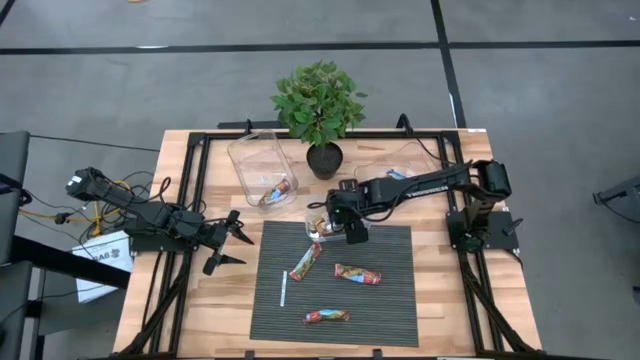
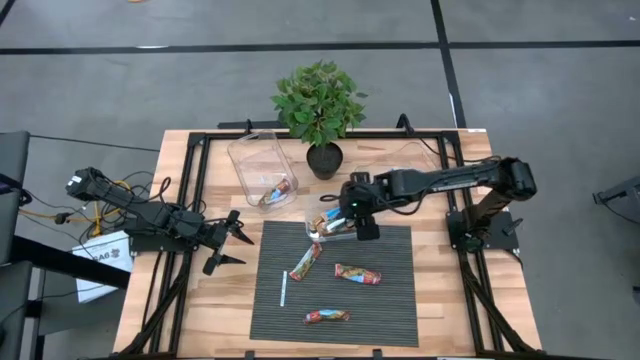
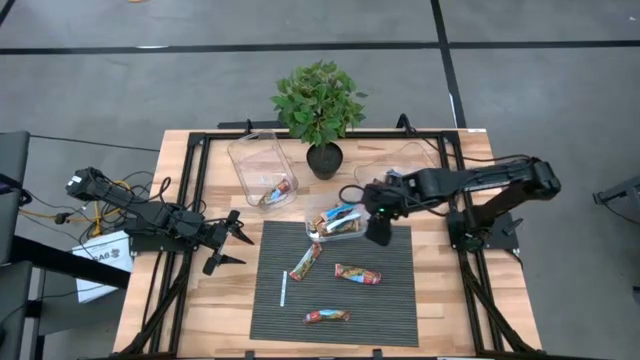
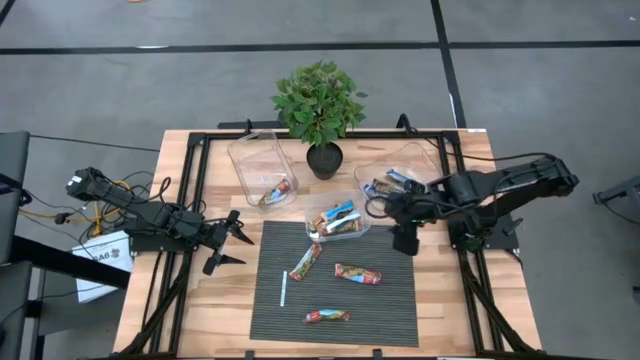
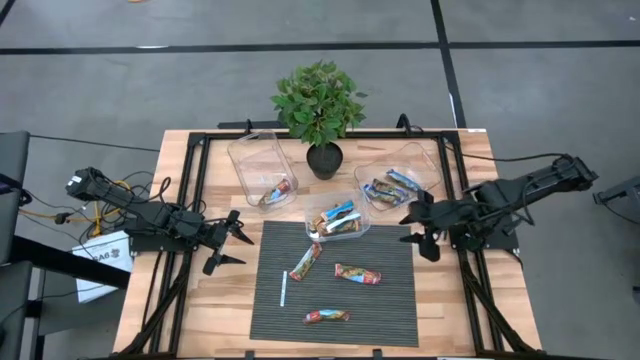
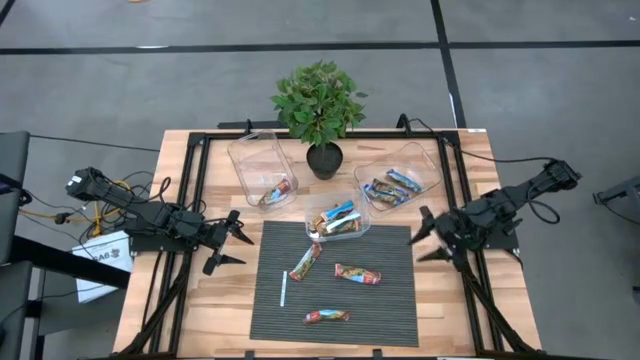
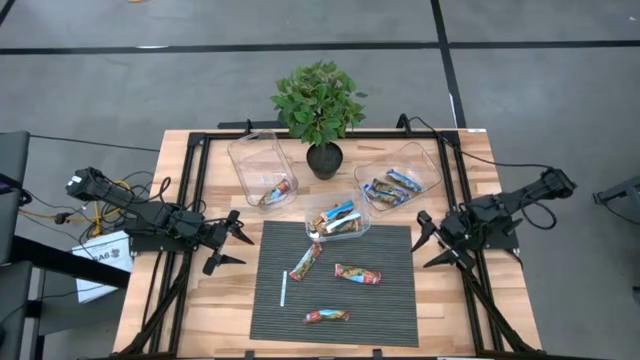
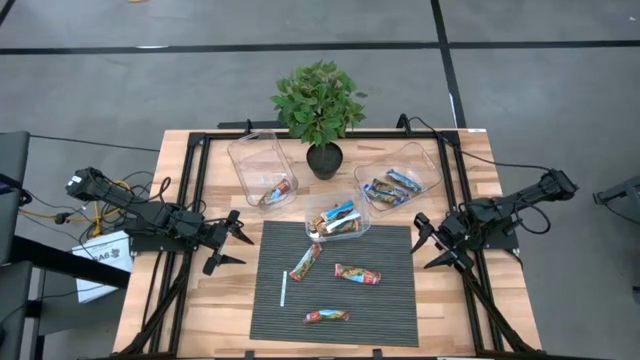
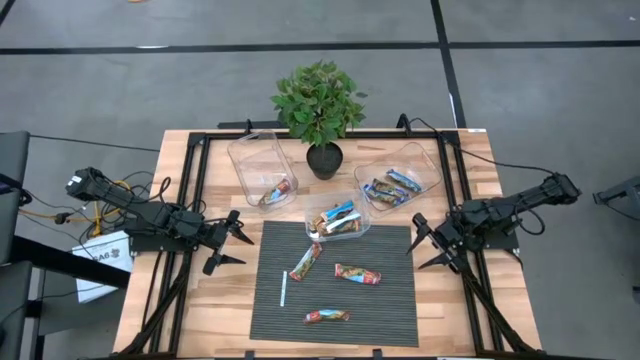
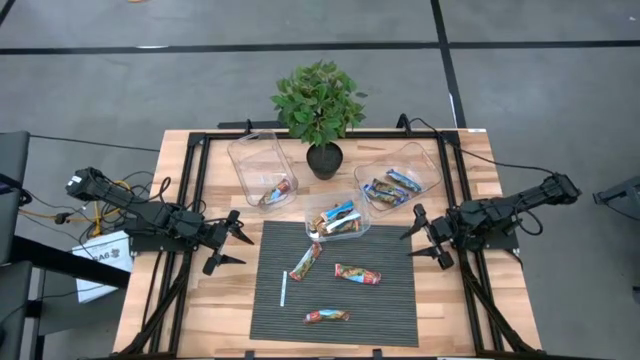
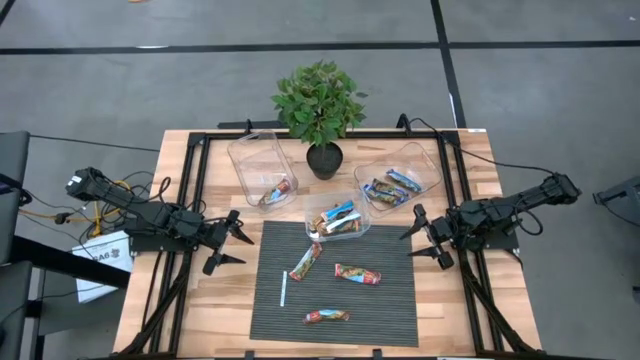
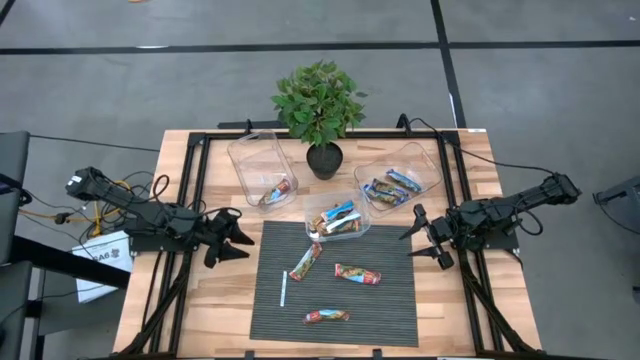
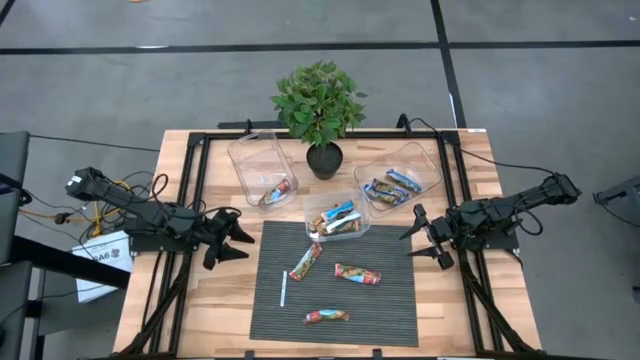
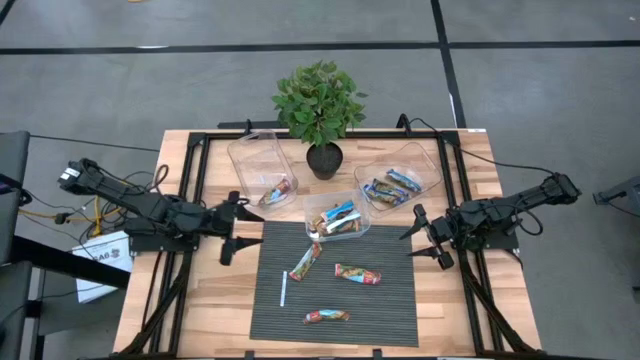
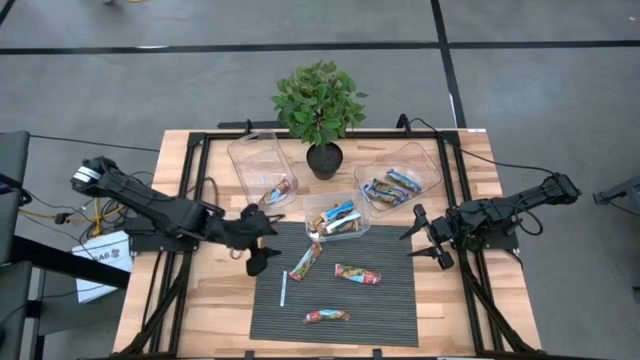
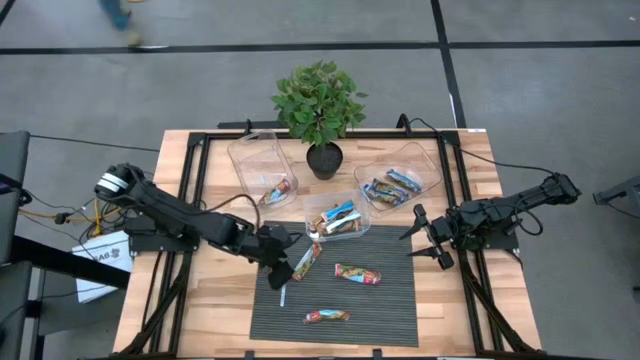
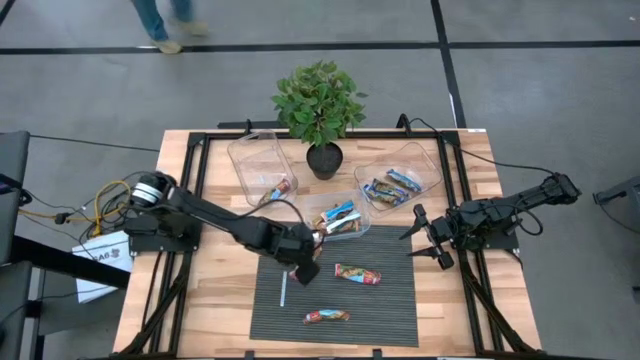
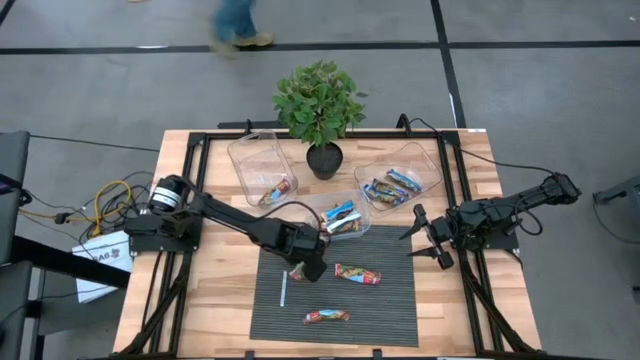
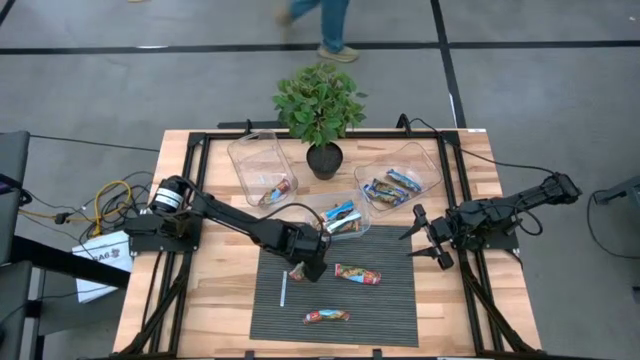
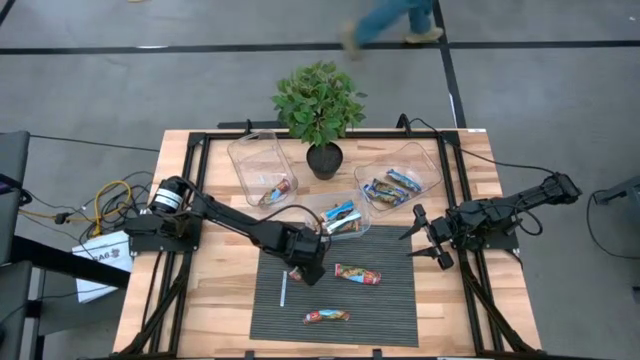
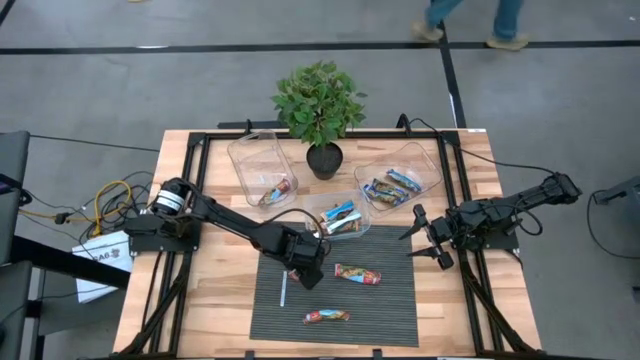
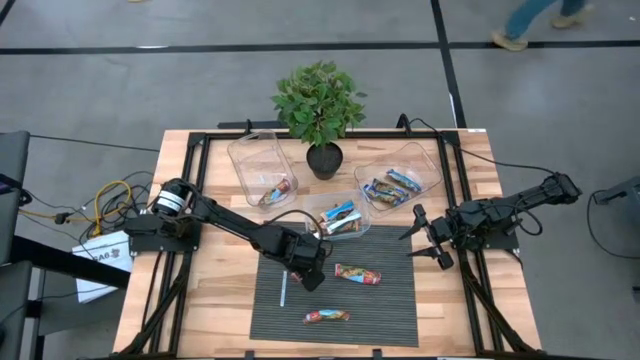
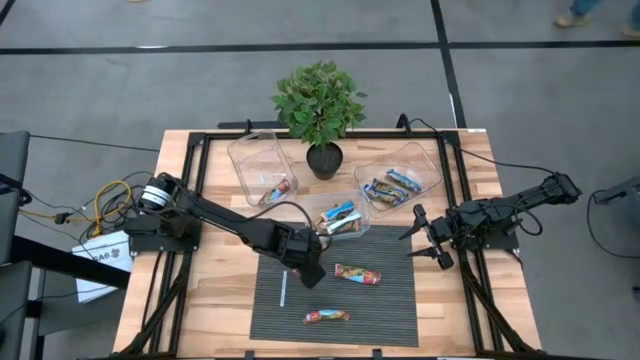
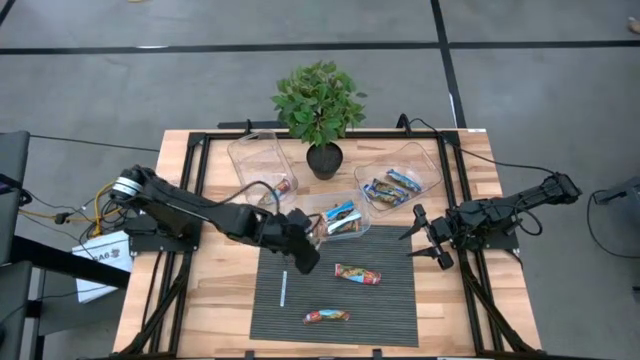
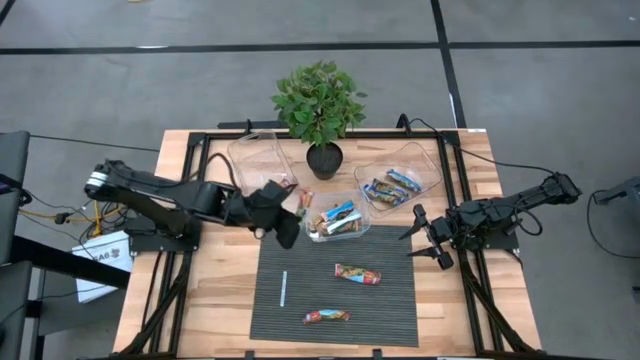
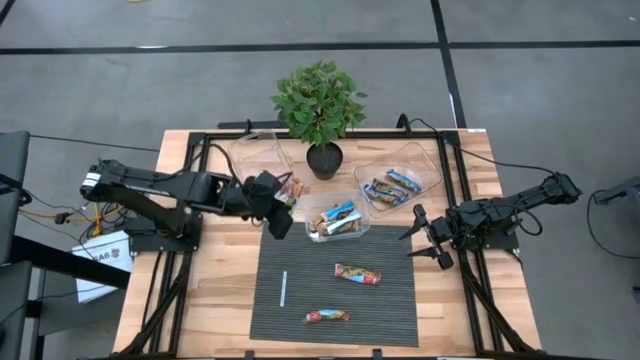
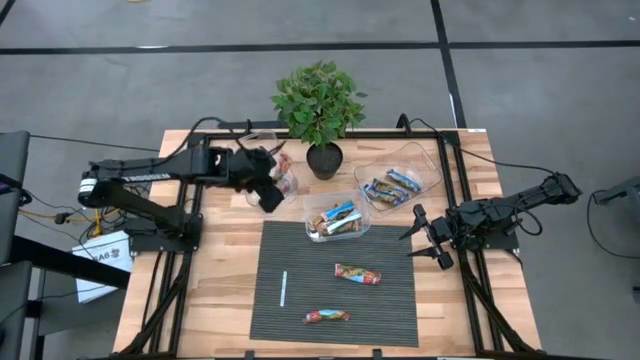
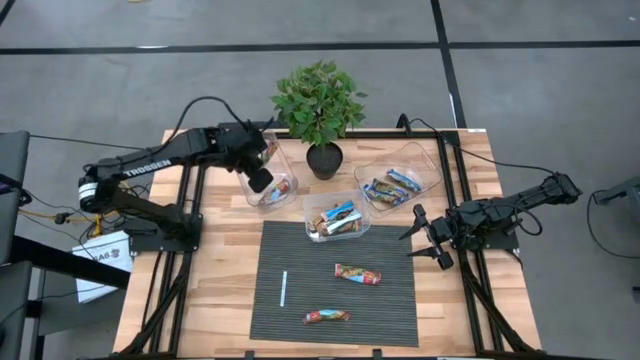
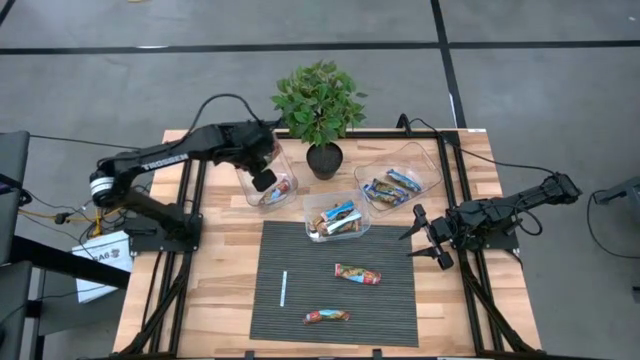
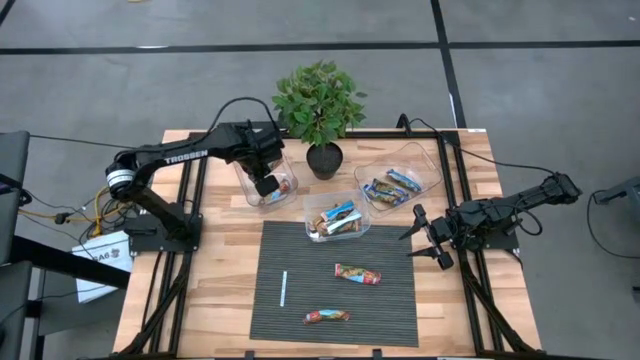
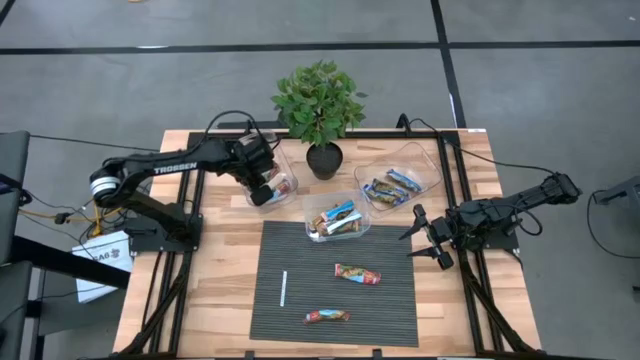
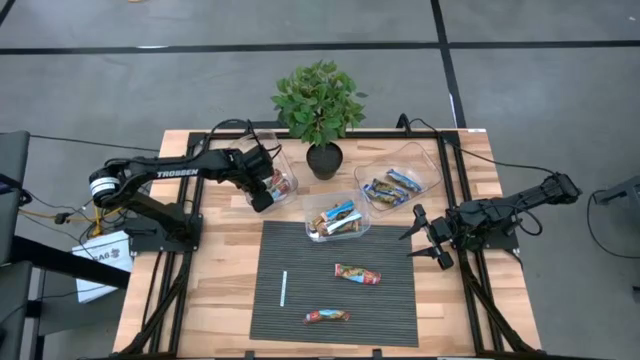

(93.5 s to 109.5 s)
Task: Pick and place Granola Bars by type
Put the red granola bar into the left transparent bin

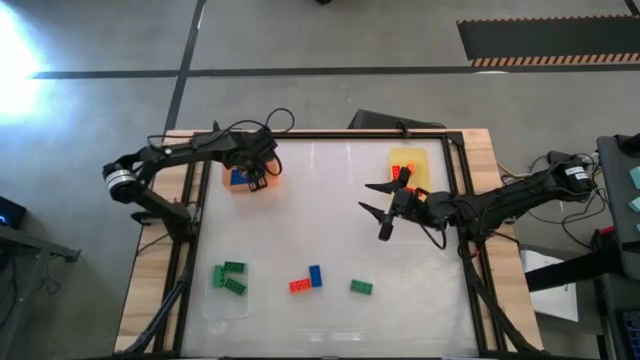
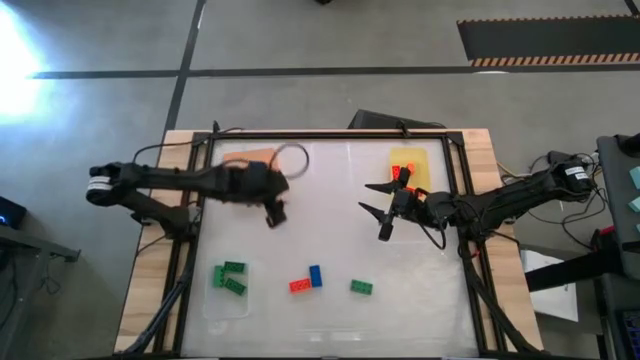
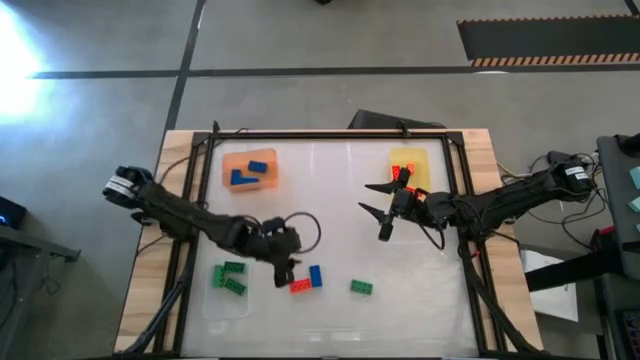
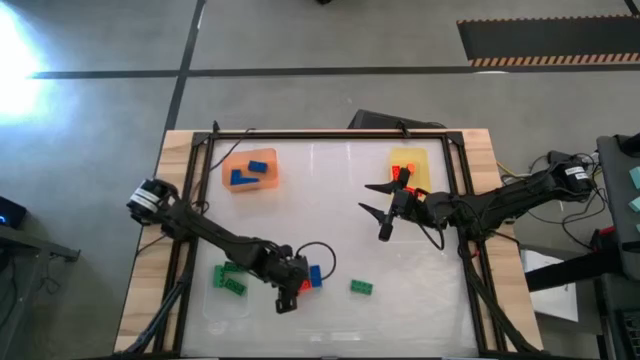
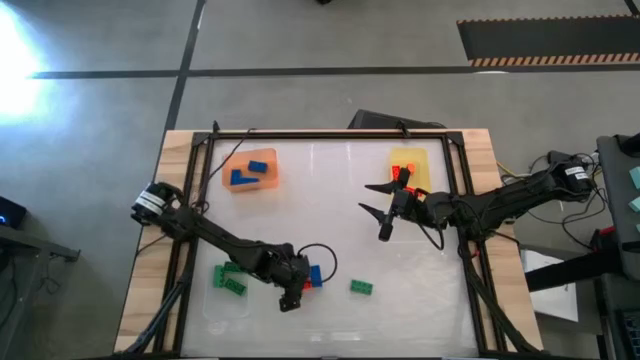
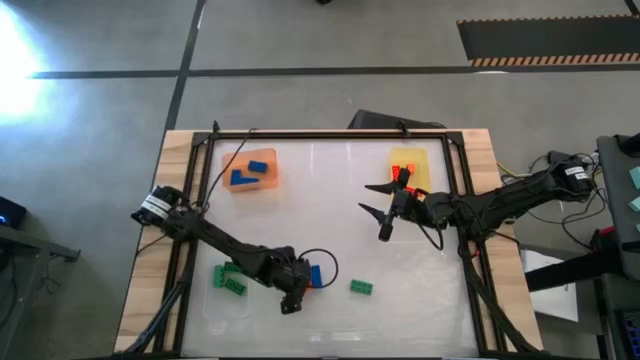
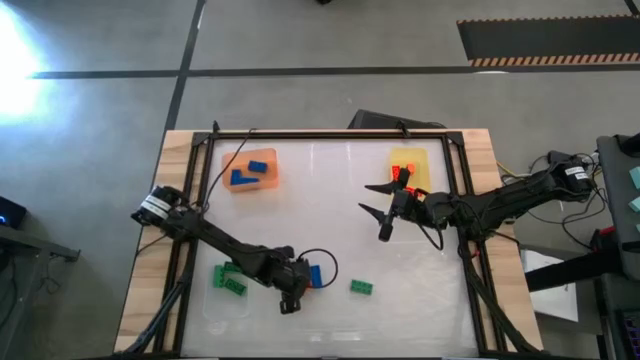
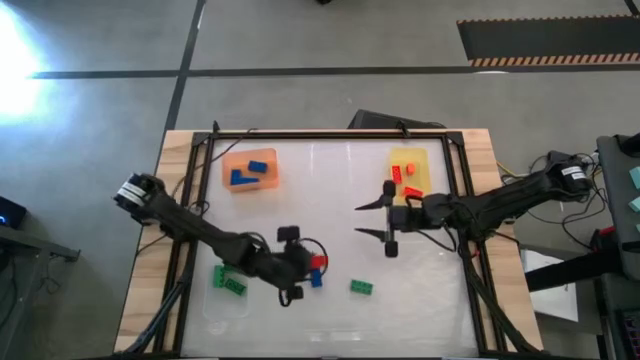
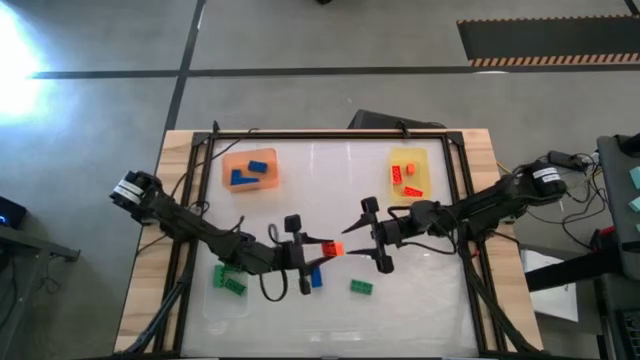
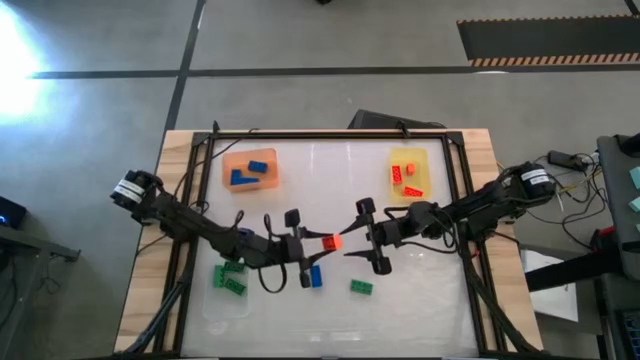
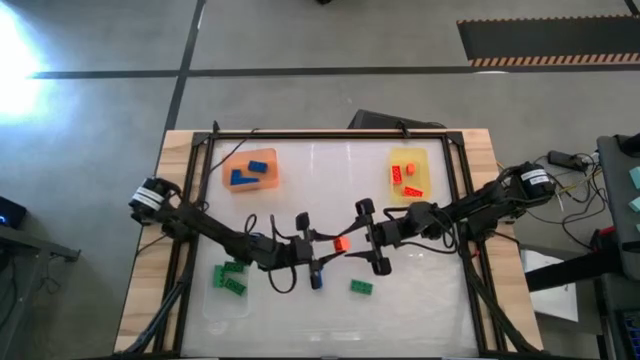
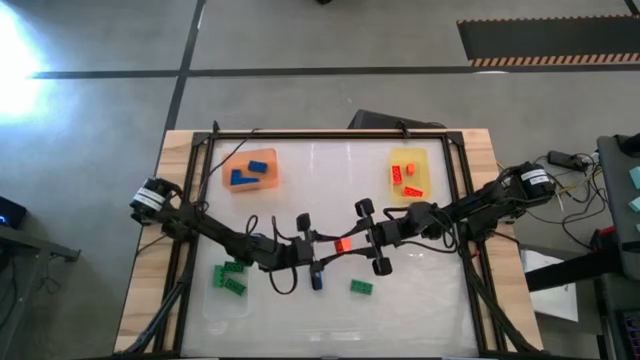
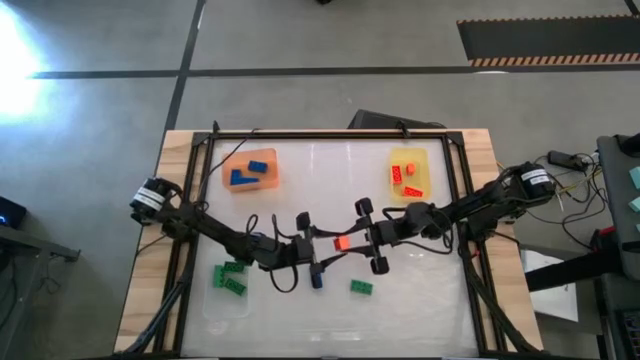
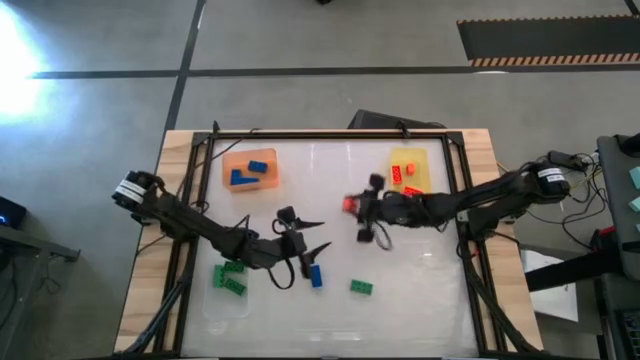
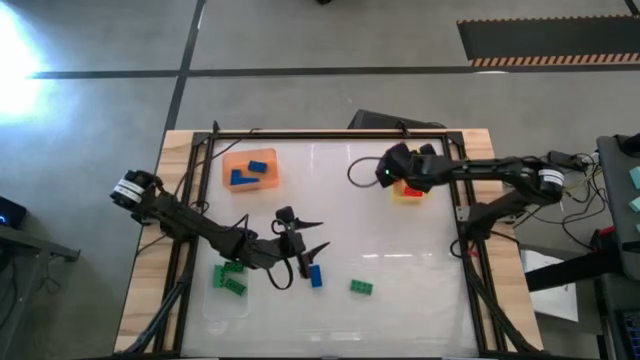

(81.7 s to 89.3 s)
Task: Sort & place blocks by color
Put the orange game piece into the yellow bin
